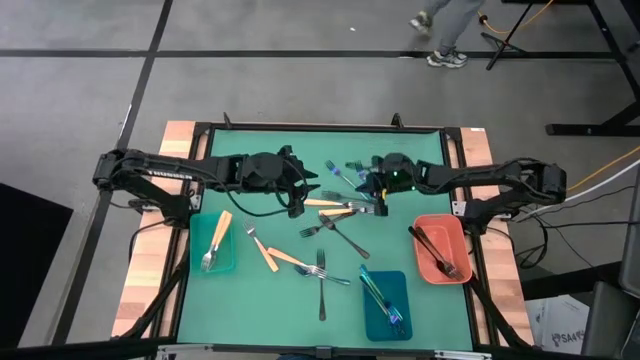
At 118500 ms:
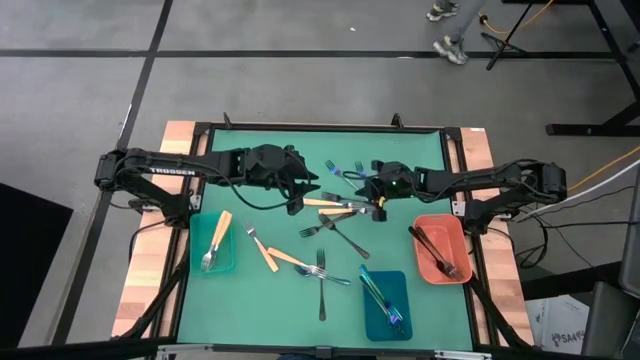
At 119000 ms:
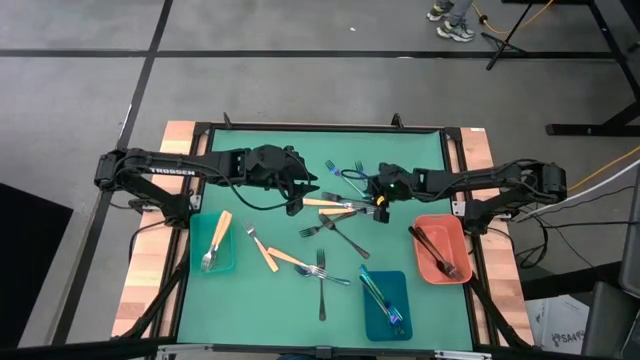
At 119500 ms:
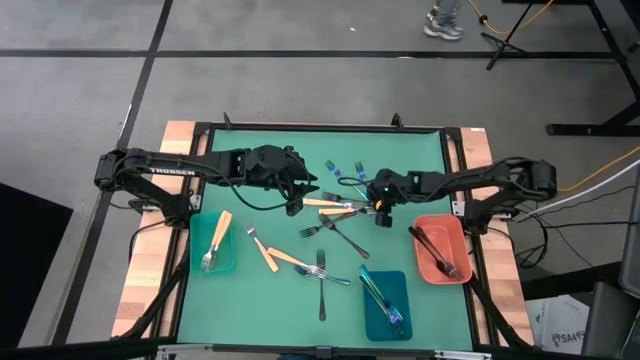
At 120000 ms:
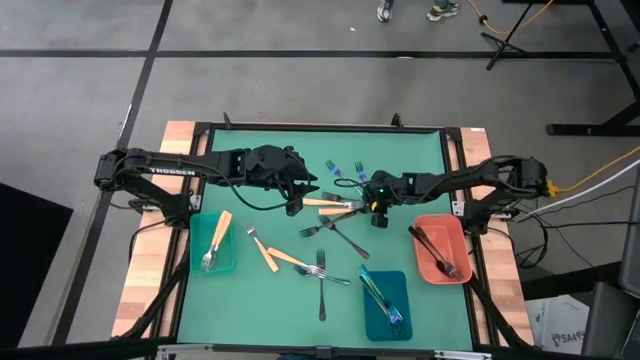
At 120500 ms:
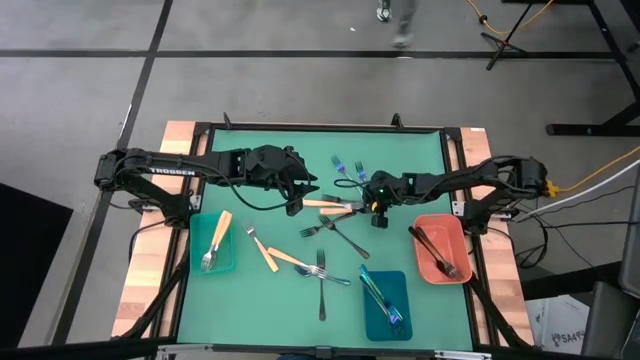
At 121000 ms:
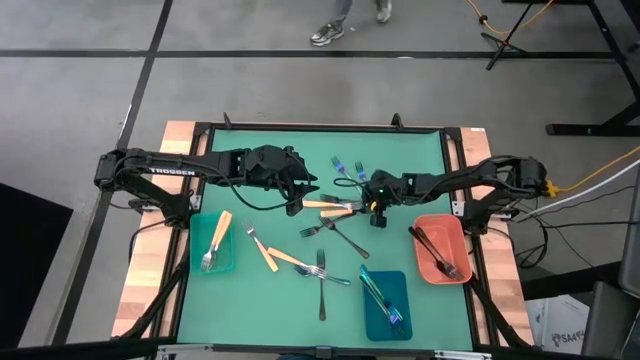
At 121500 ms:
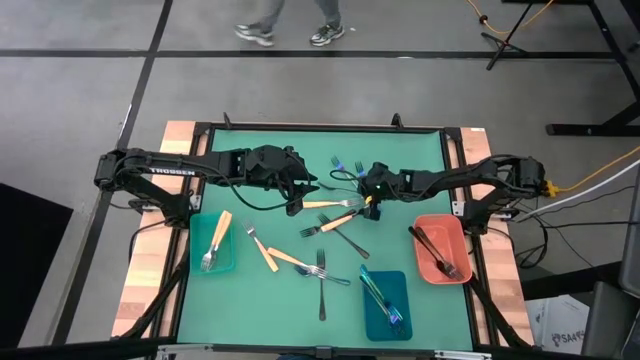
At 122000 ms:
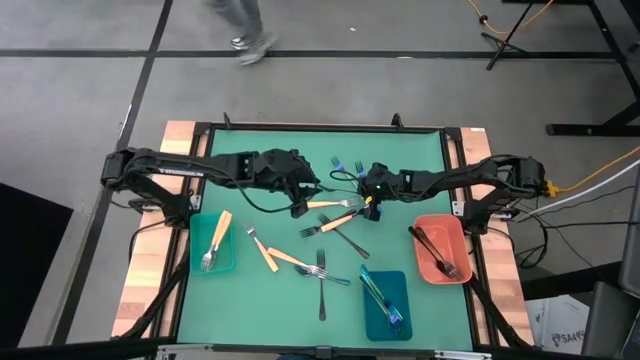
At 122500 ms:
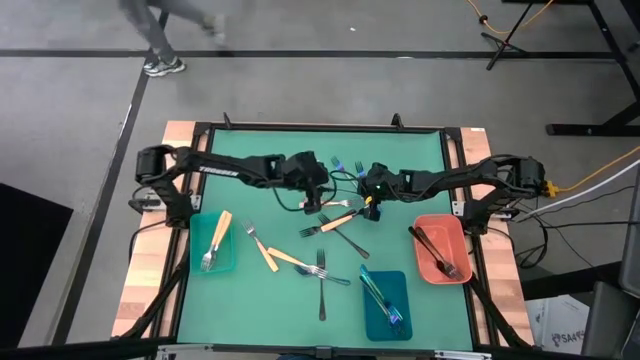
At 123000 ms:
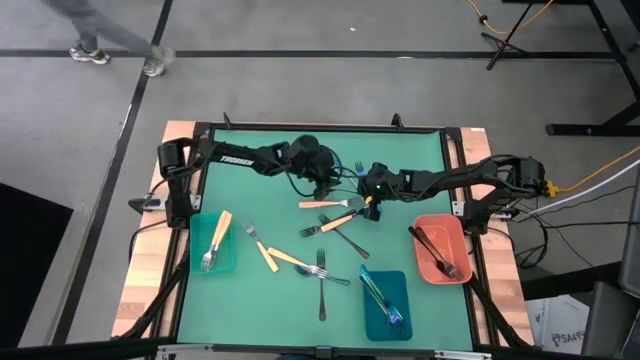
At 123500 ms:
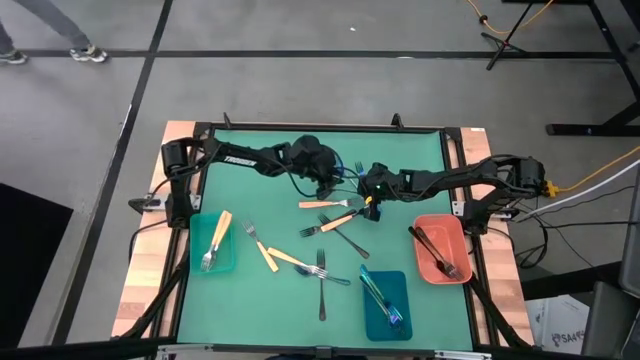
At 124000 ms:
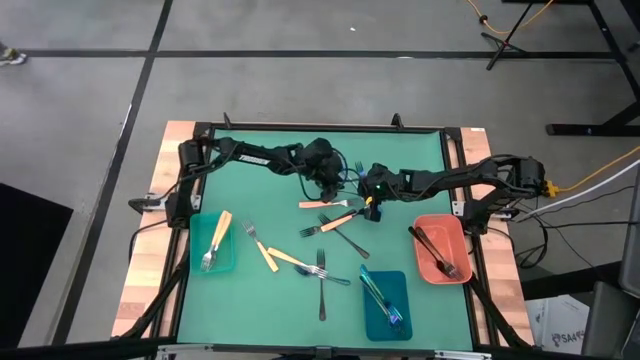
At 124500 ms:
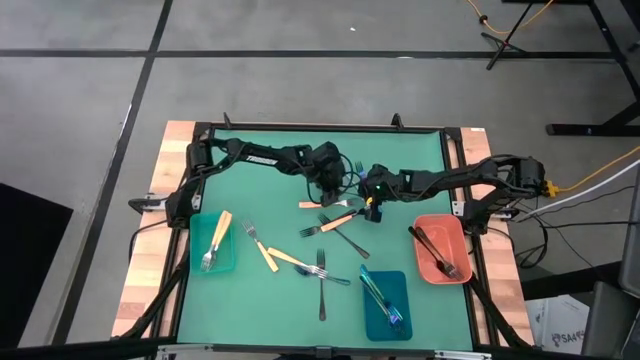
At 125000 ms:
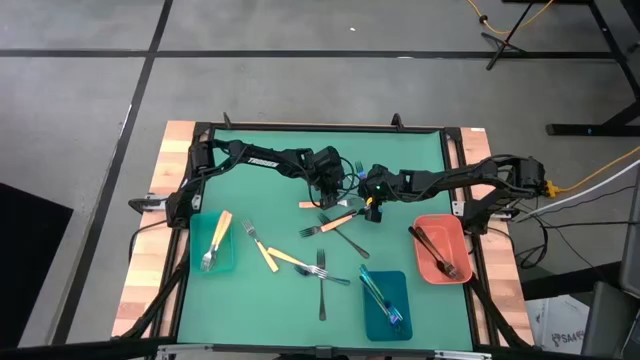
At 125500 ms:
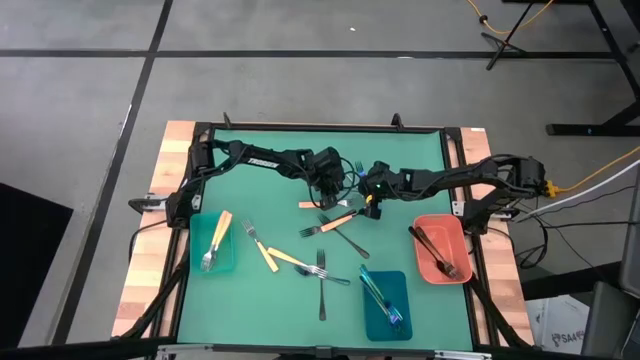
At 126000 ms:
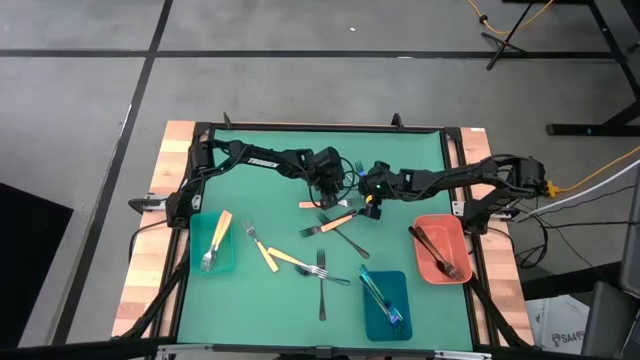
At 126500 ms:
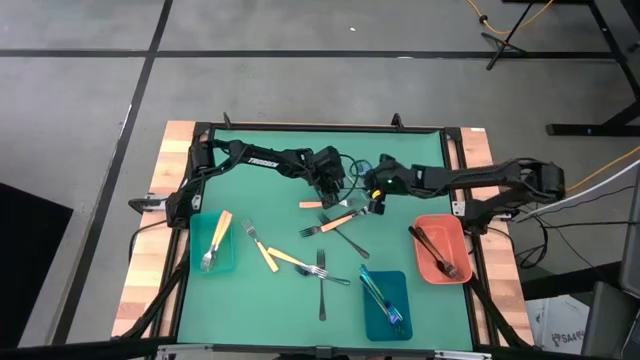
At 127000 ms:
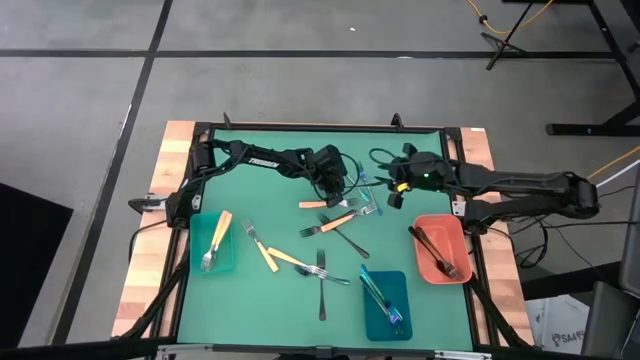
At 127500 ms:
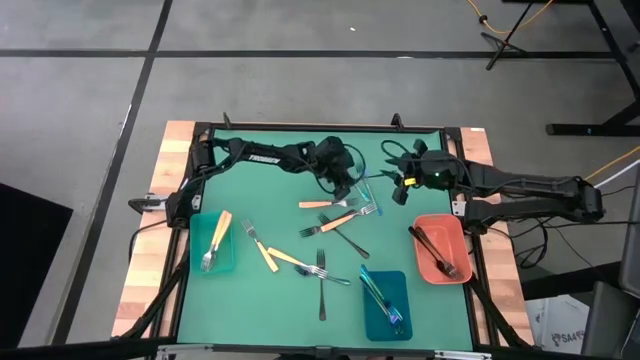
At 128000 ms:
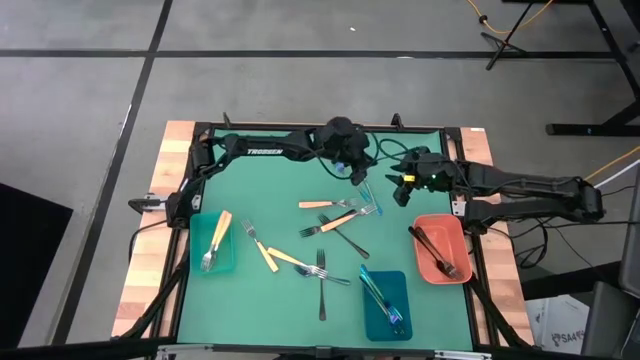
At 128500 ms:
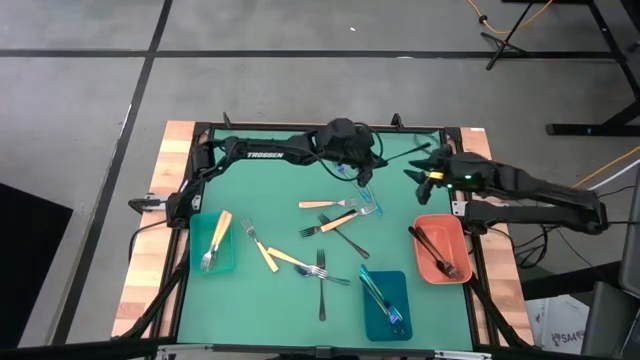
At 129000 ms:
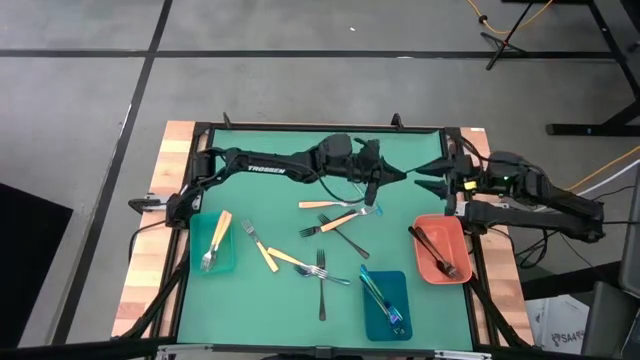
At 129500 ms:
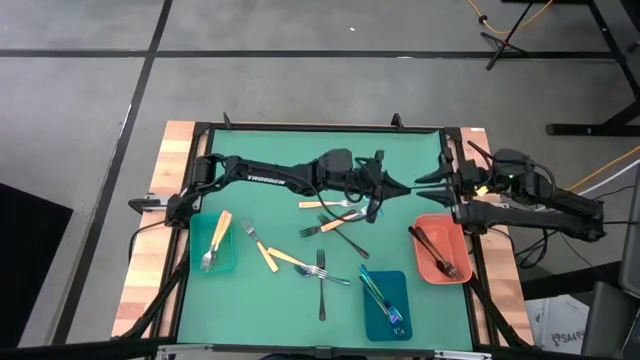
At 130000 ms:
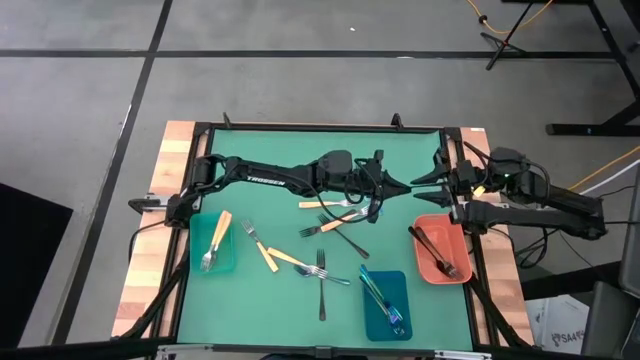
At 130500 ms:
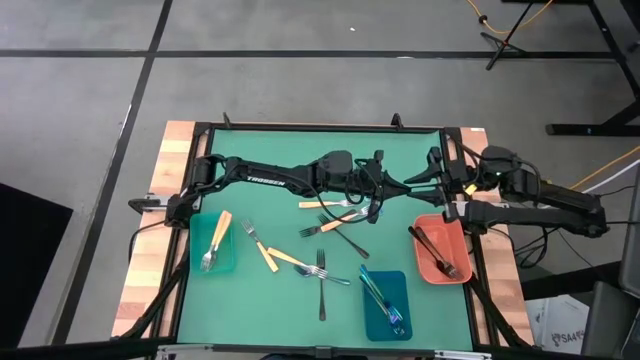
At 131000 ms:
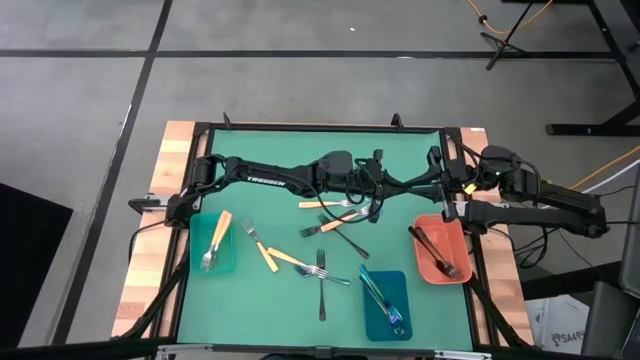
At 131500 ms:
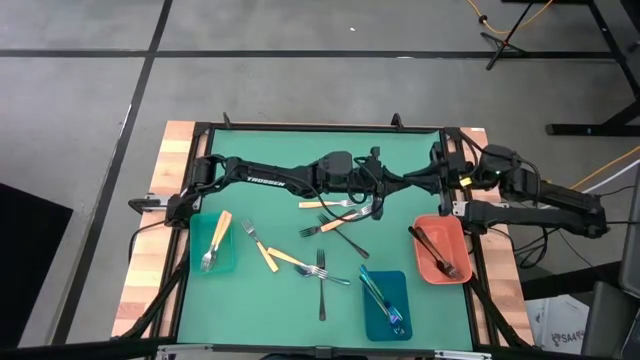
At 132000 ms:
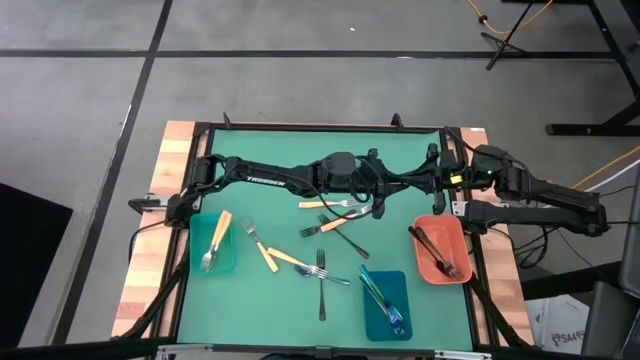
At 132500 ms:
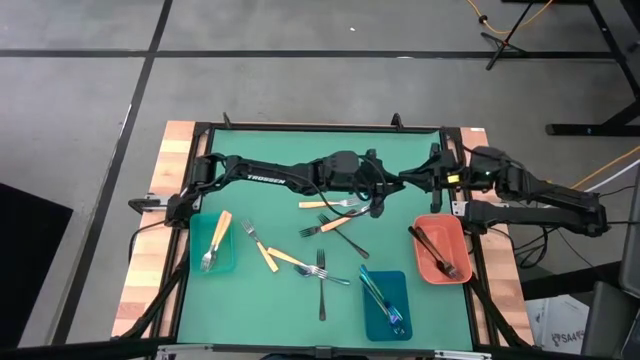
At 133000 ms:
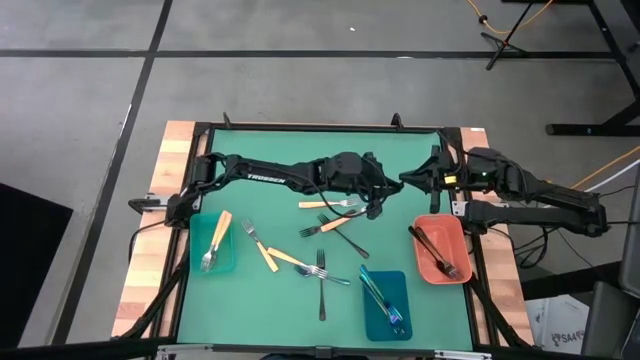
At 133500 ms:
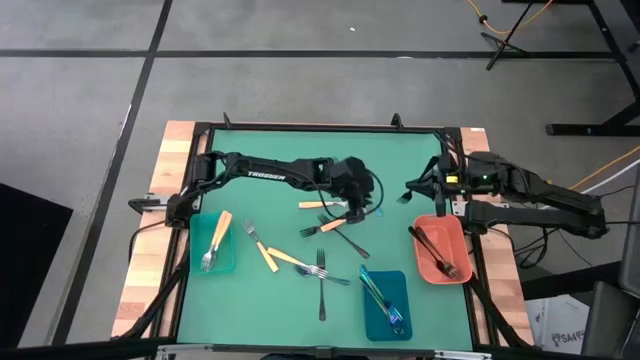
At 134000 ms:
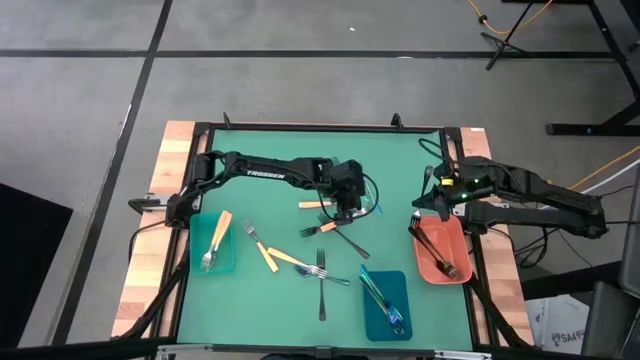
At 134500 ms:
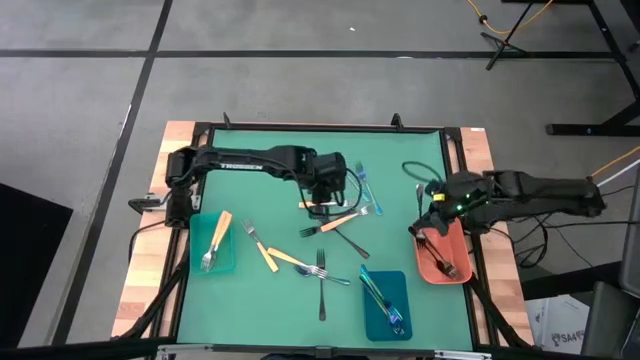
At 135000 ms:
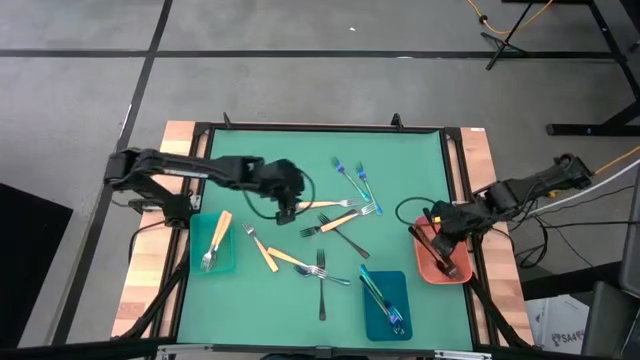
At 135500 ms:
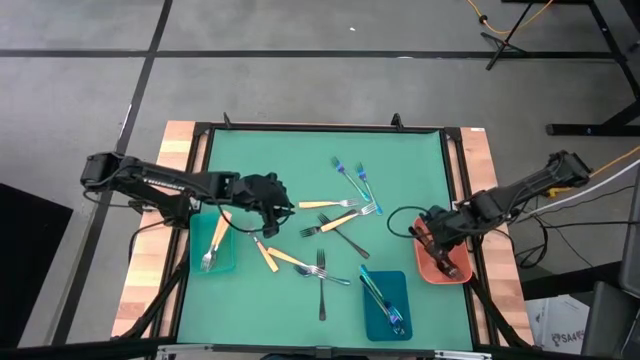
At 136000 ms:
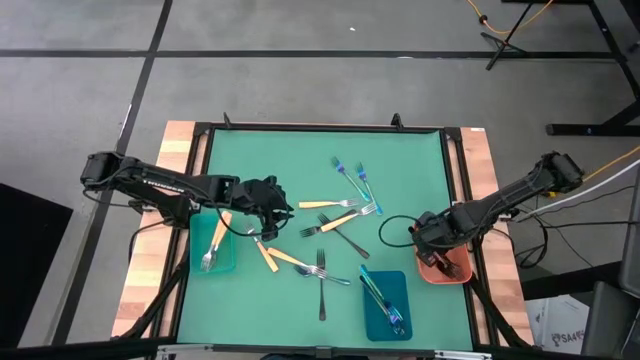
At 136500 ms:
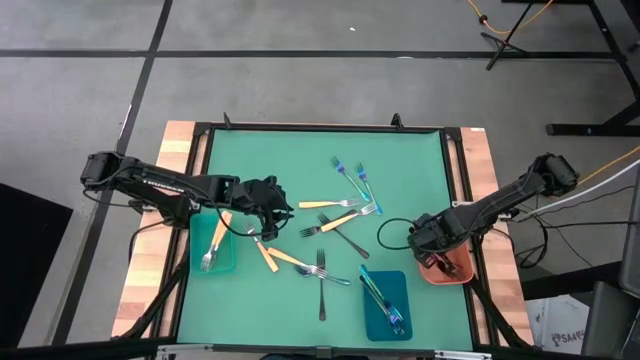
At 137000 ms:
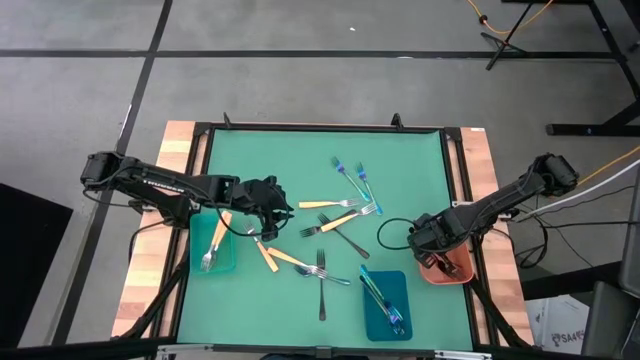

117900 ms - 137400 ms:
Task: Sort silverware by color (type)
Put the black fork into the orange bin

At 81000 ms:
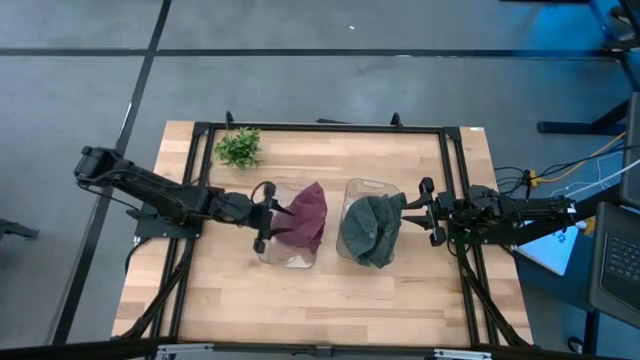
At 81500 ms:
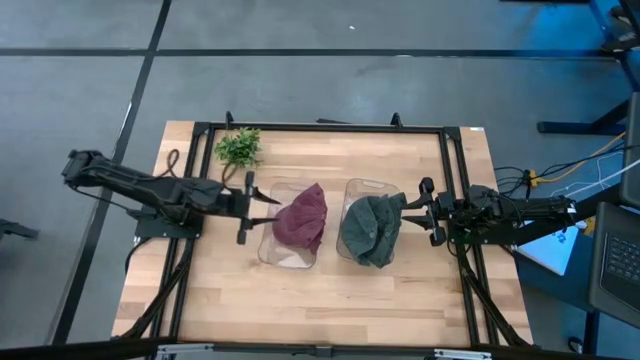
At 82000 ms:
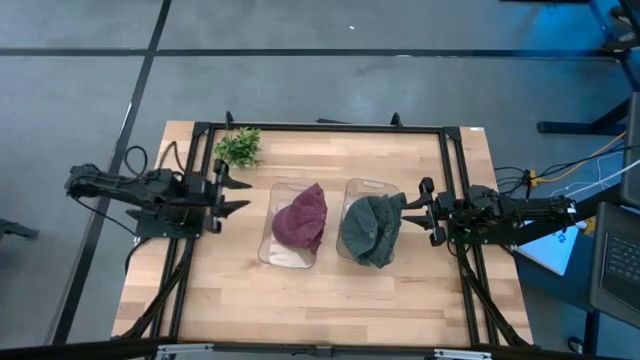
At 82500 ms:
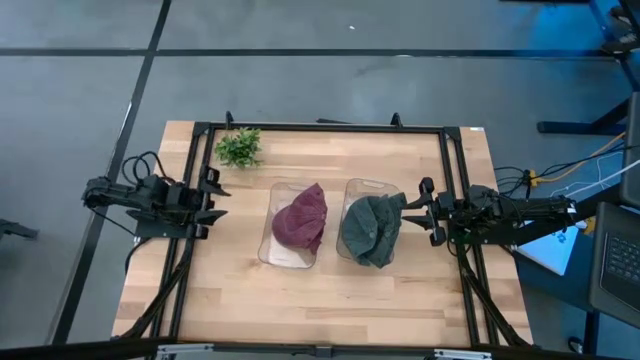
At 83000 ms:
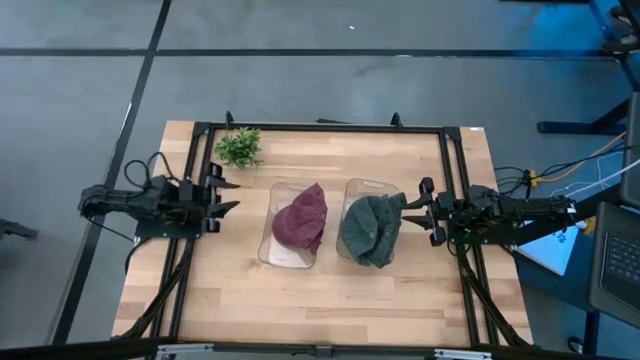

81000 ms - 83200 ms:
Task: Pick & Place hat
Return to Home Position
